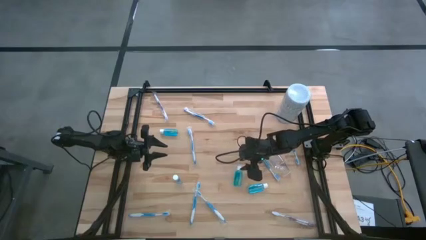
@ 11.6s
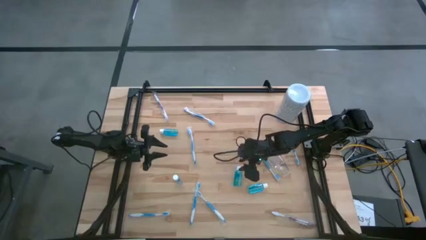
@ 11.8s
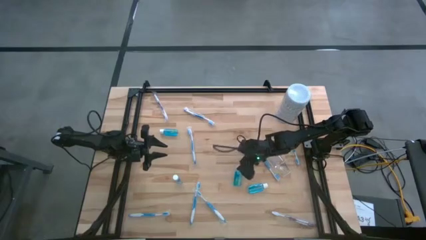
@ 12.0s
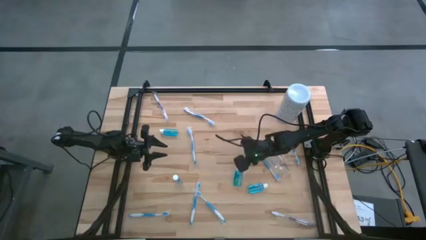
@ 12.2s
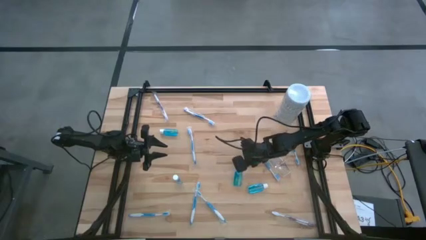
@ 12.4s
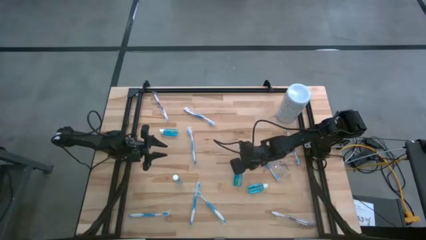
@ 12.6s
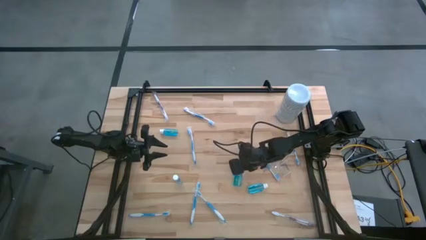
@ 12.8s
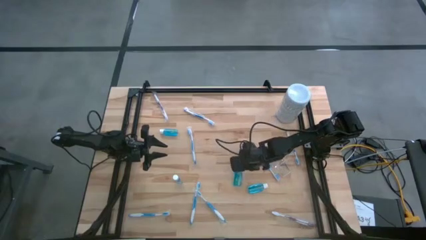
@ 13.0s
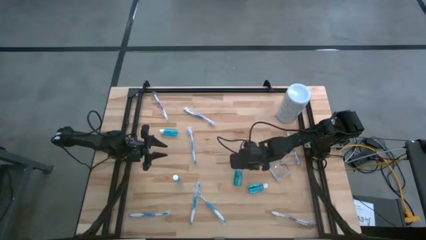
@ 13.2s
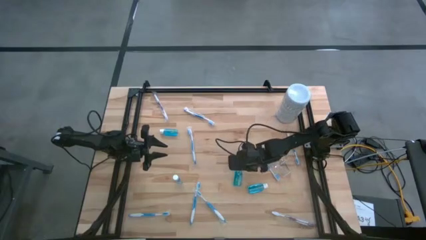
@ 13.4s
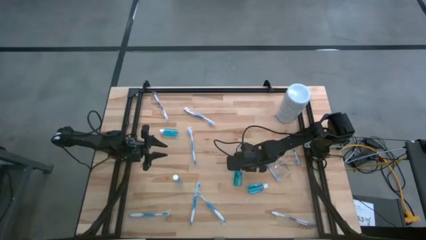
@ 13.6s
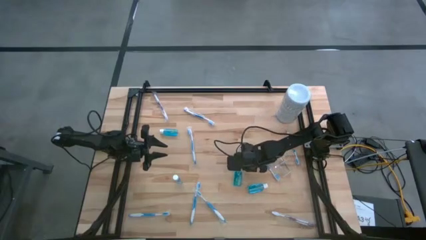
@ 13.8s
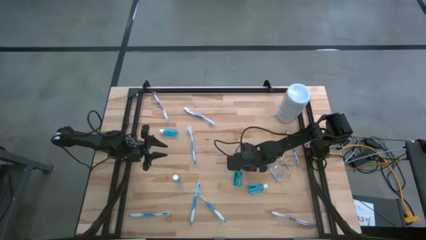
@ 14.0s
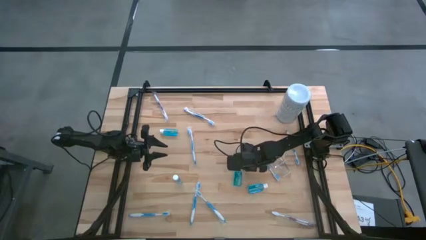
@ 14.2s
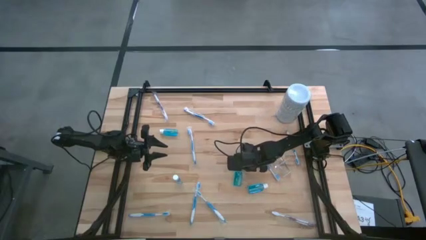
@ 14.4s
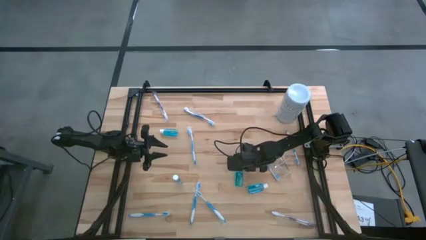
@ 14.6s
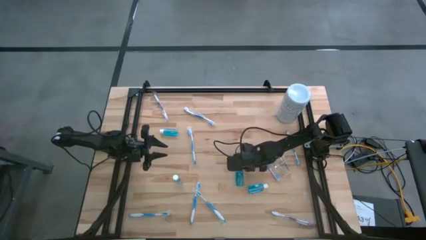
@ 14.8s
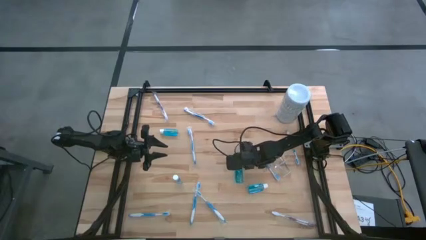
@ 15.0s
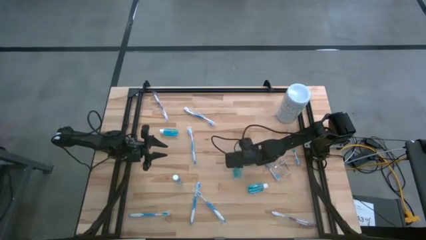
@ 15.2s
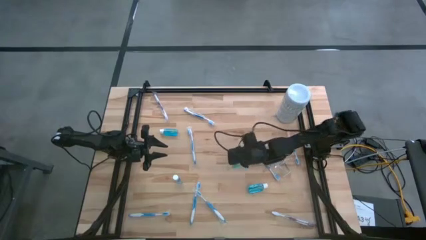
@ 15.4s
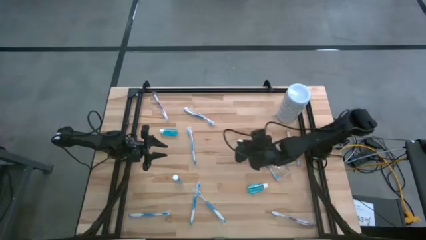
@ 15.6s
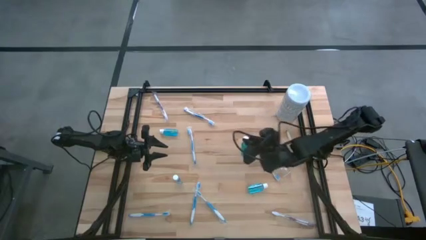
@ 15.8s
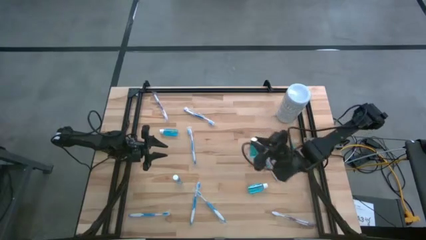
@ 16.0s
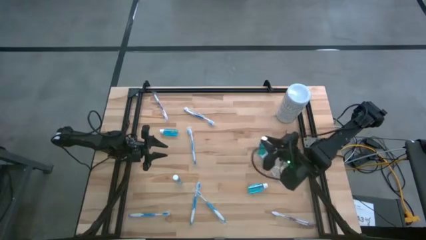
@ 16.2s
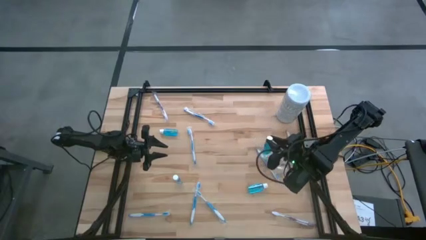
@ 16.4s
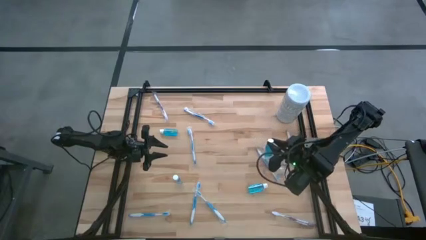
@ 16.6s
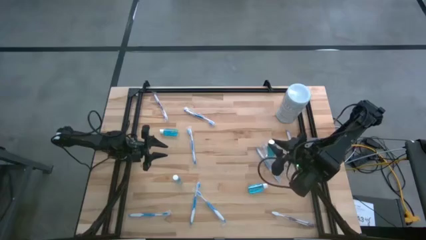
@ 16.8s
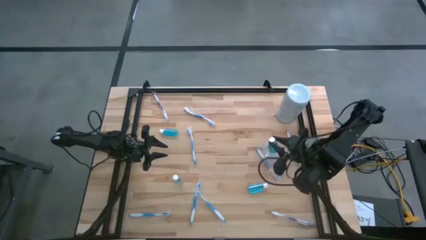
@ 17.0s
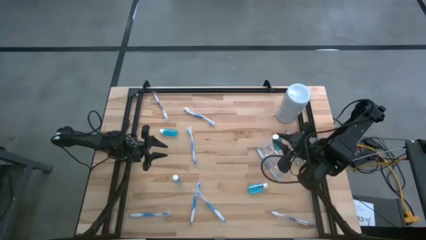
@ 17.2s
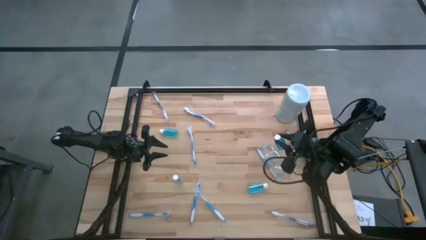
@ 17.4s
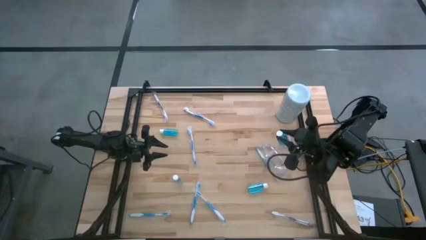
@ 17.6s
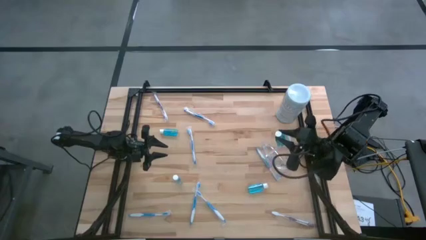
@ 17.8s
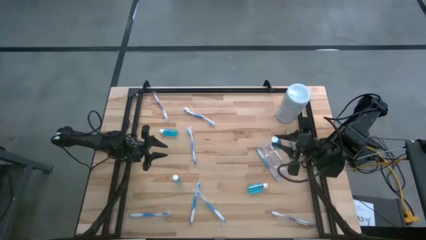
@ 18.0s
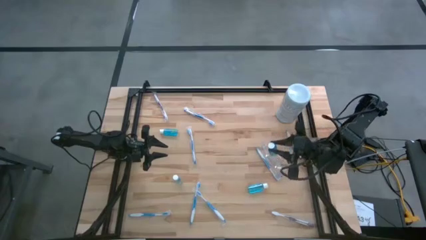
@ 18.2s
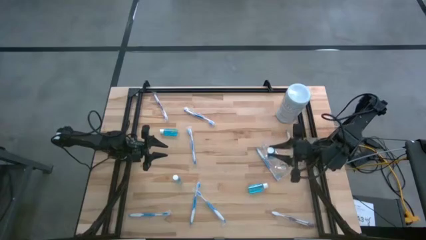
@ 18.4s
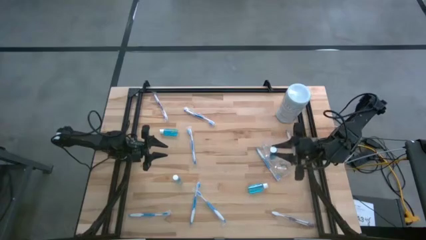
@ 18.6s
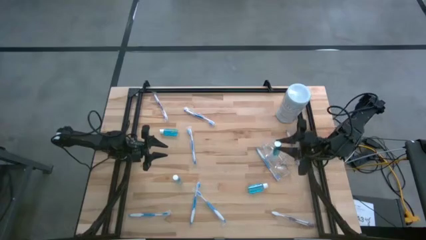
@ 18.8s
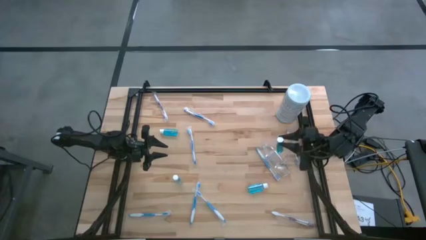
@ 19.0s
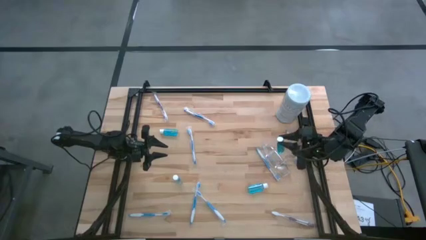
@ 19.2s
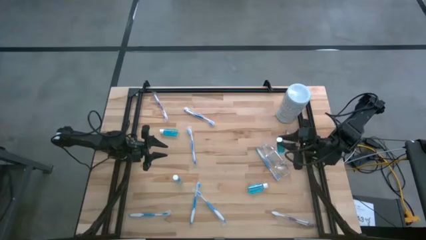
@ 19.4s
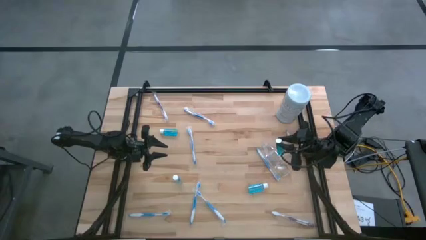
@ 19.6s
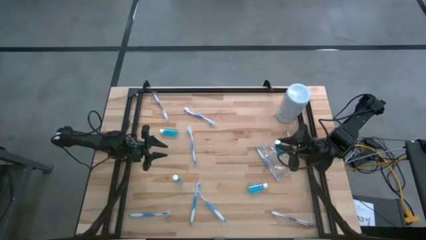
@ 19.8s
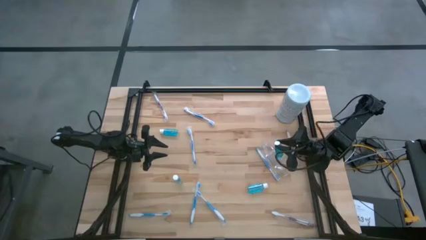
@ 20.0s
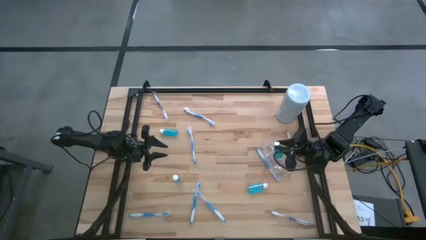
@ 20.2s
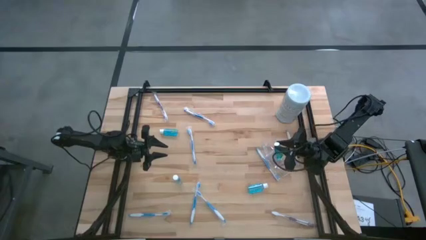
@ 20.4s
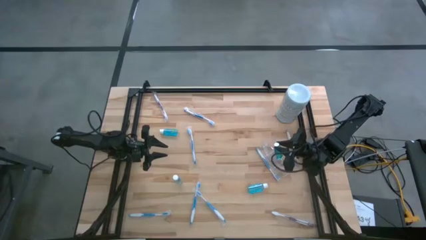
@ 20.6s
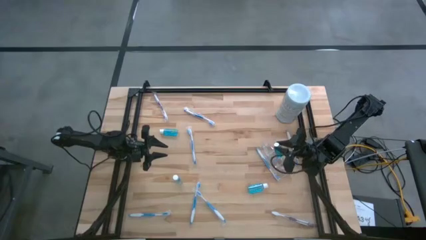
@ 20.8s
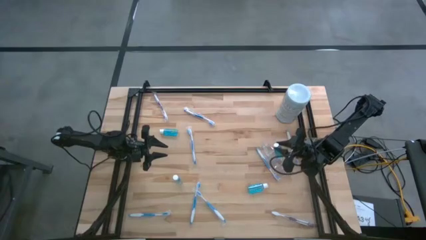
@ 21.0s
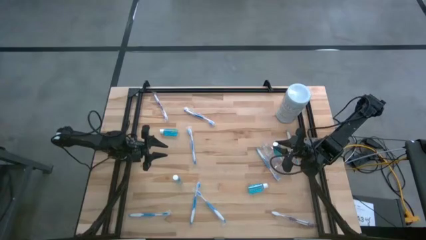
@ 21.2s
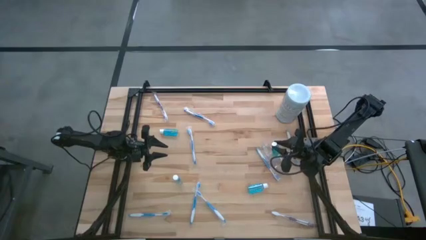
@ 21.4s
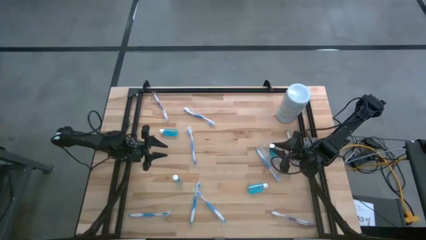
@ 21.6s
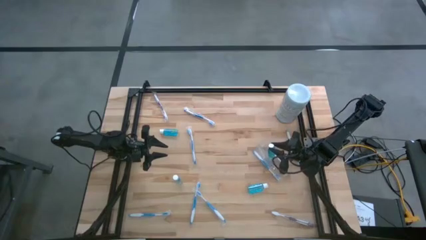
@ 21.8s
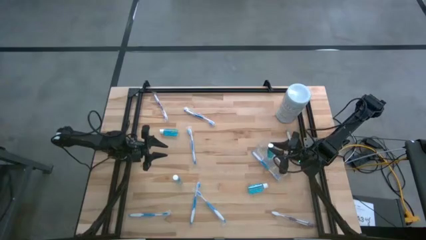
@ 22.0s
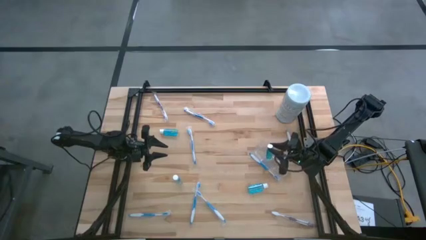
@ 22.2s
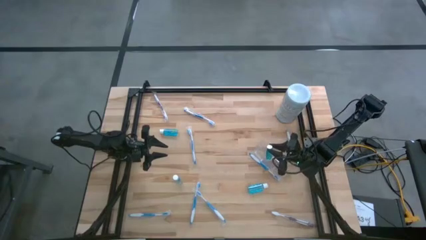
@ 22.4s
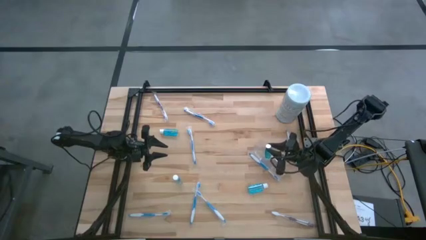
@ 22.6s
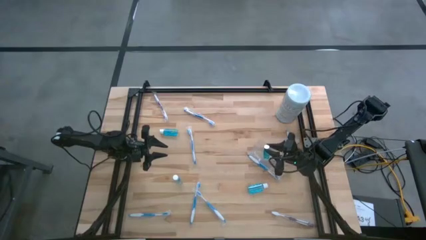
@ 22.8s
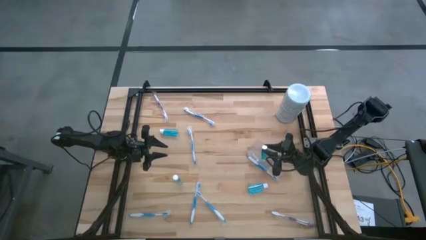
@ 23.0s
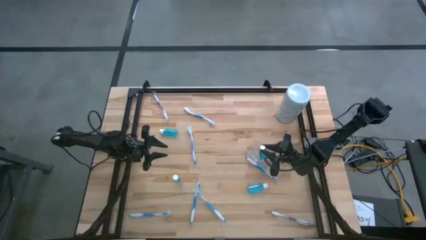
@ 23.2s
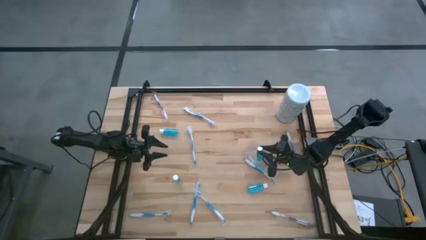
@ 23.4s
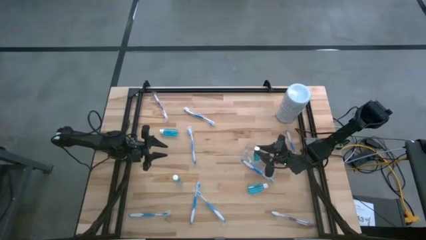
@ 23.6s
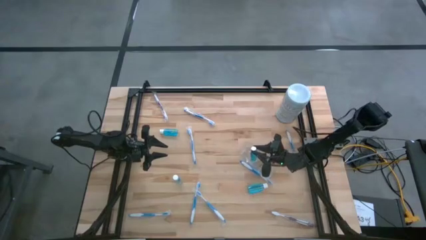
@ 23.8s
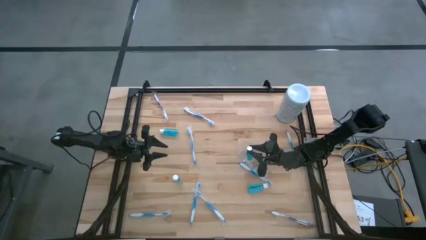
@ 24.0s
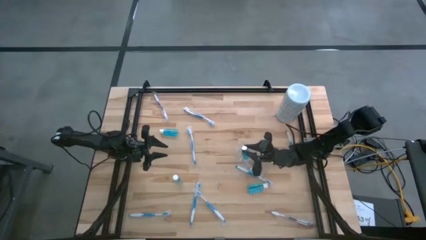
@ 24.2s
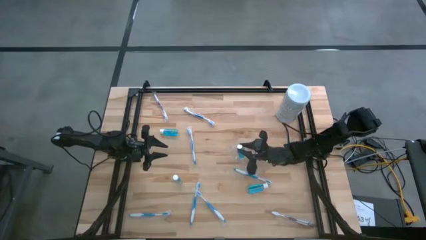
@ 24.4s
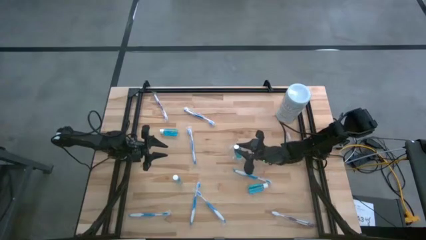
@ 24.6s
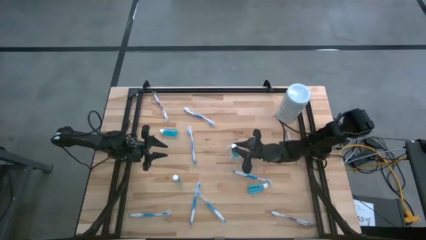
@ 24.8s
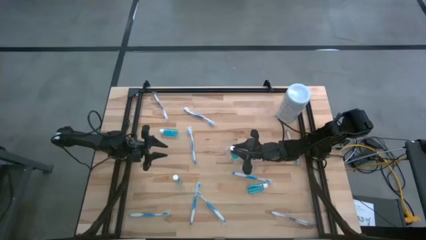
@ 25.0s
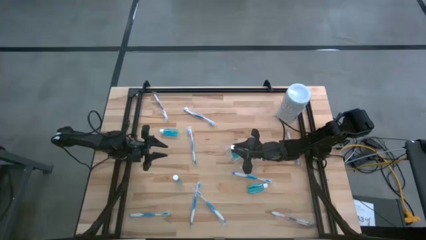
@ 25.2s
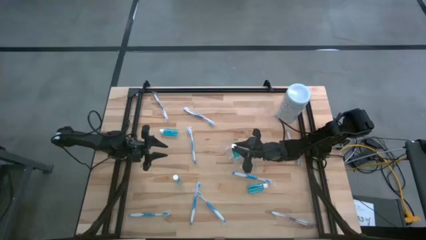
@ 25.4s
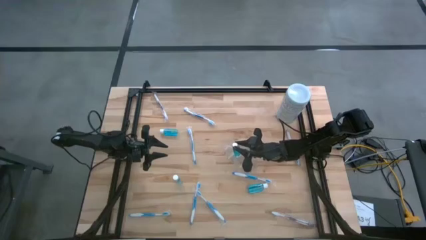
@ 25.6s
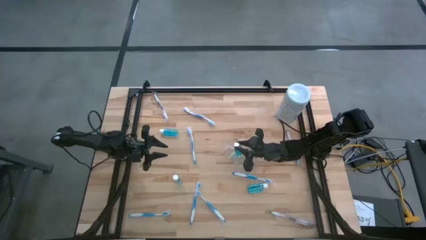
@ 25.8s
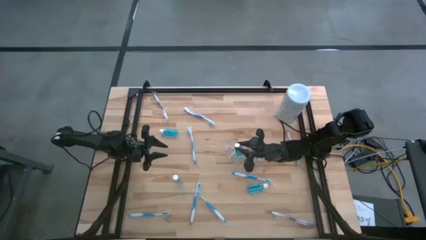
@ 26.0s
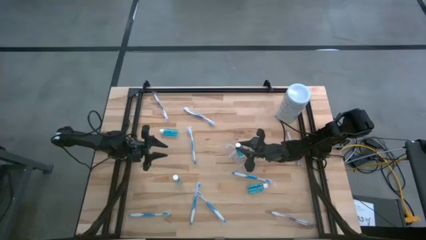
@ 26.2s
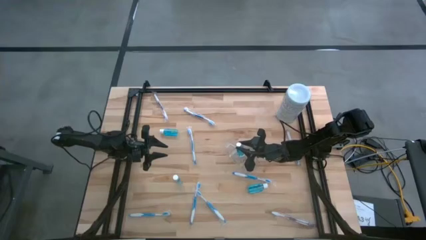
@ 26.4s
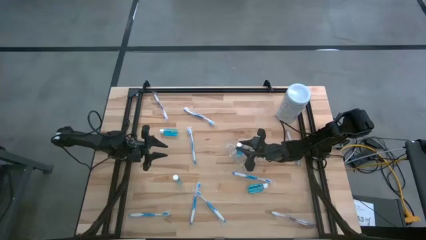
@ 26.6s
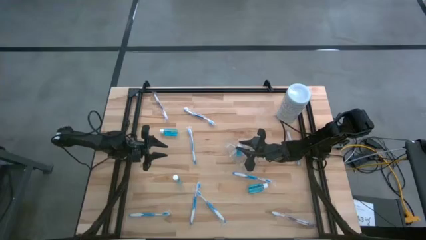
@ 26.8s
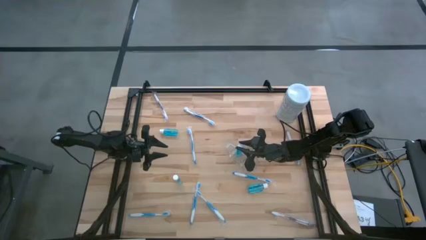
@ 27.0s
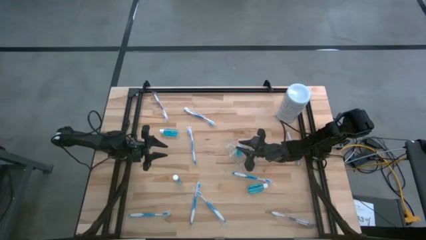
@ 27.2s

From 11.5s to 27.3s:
Task: Pick & Place toothbrushing station
Put the blue mouthwash into the middle section of the transparent organizer
